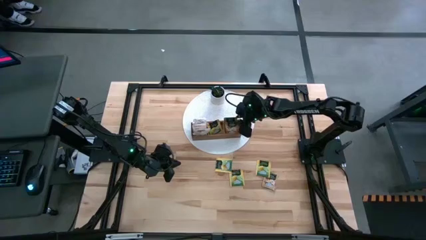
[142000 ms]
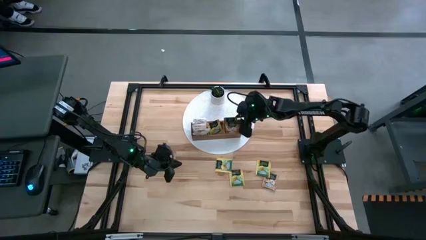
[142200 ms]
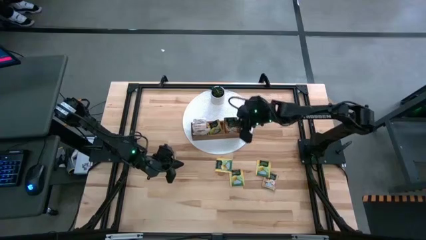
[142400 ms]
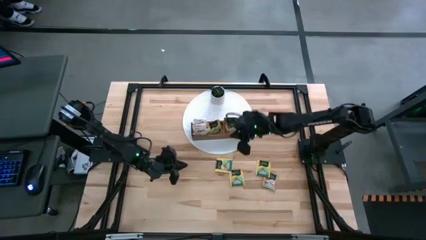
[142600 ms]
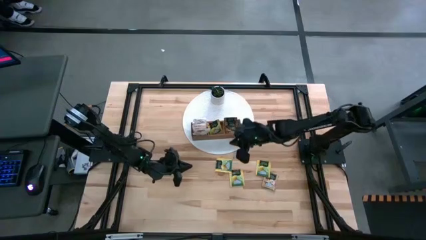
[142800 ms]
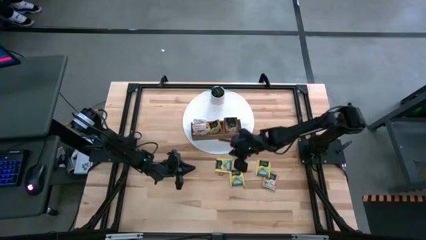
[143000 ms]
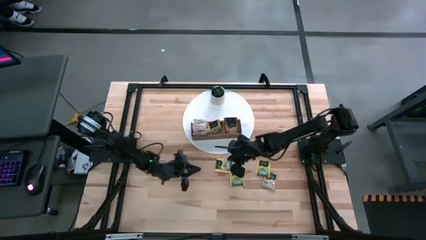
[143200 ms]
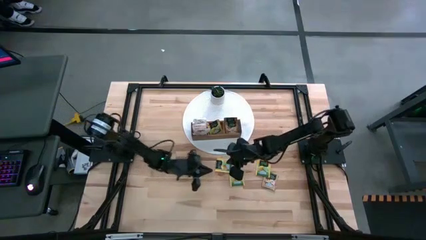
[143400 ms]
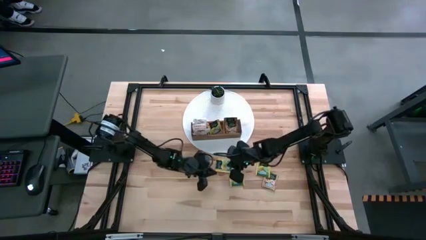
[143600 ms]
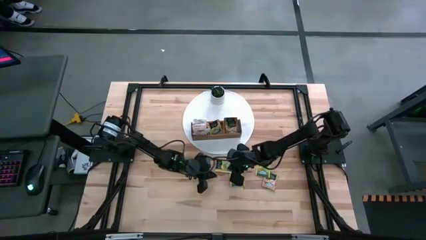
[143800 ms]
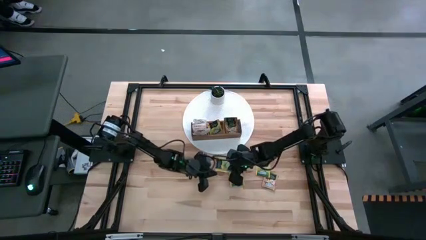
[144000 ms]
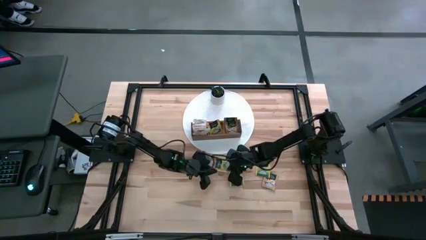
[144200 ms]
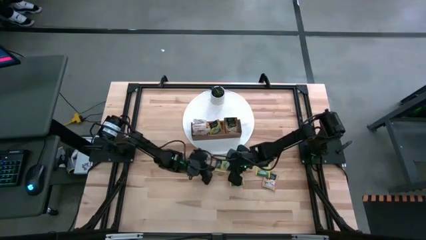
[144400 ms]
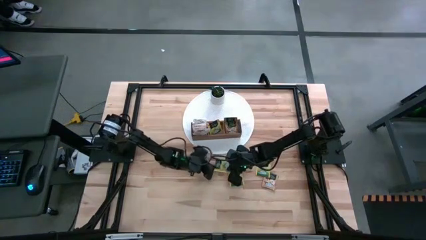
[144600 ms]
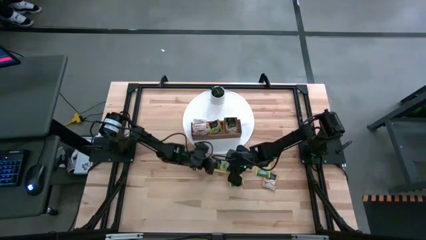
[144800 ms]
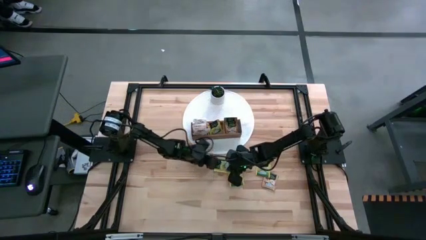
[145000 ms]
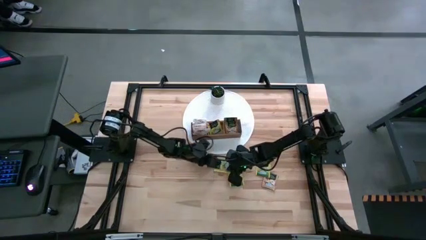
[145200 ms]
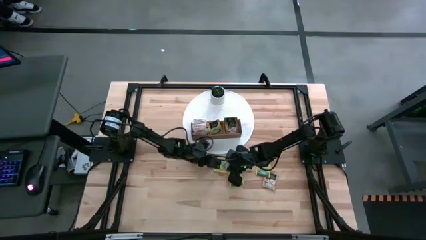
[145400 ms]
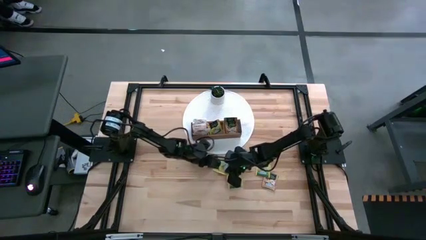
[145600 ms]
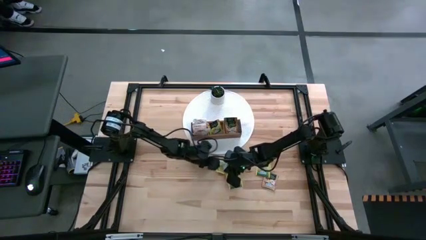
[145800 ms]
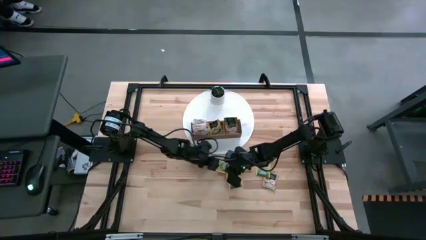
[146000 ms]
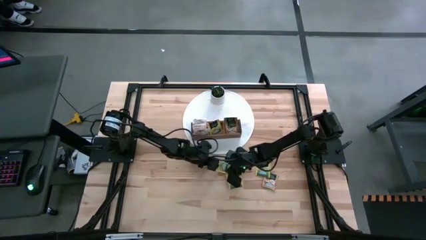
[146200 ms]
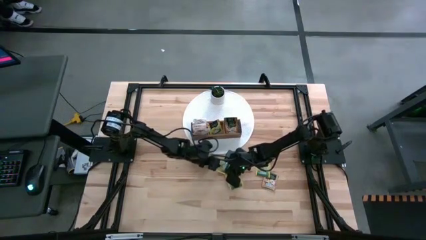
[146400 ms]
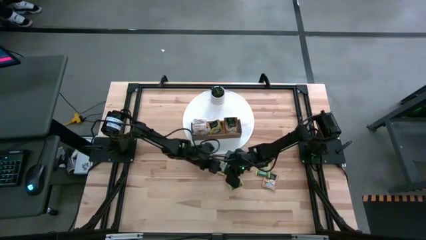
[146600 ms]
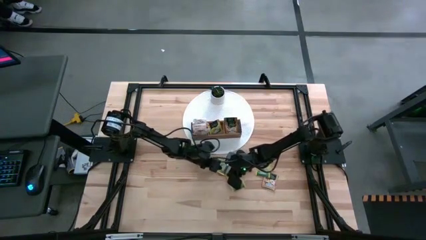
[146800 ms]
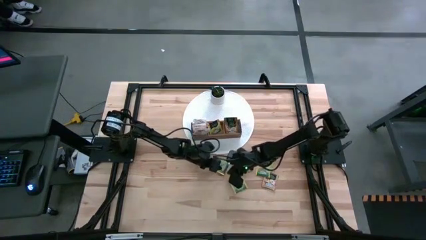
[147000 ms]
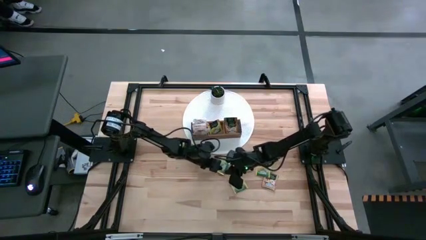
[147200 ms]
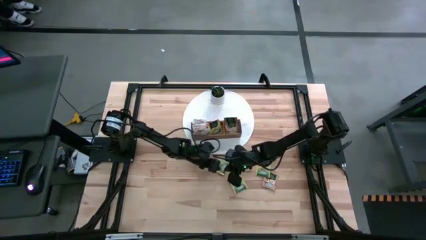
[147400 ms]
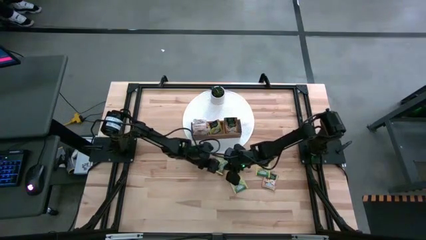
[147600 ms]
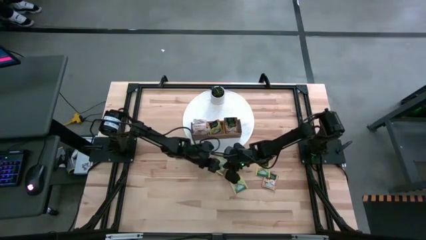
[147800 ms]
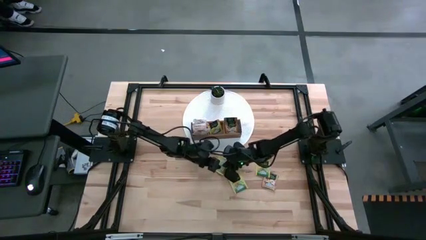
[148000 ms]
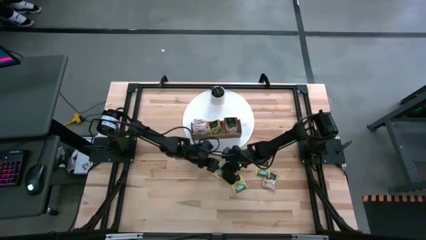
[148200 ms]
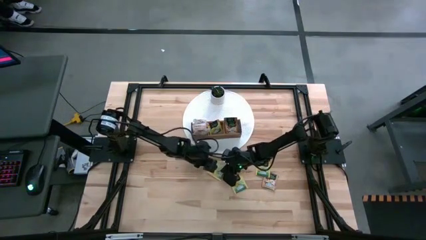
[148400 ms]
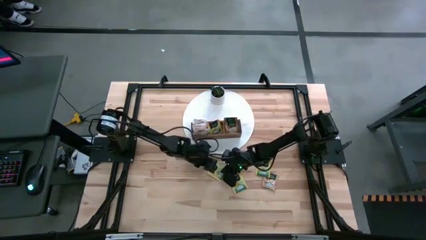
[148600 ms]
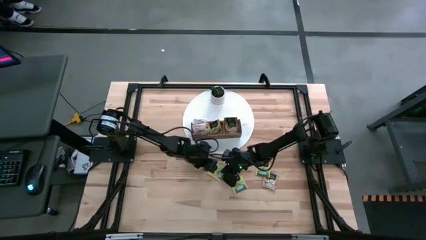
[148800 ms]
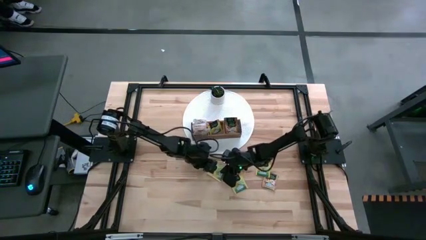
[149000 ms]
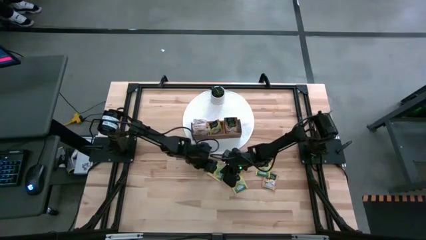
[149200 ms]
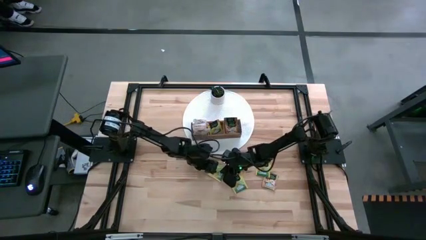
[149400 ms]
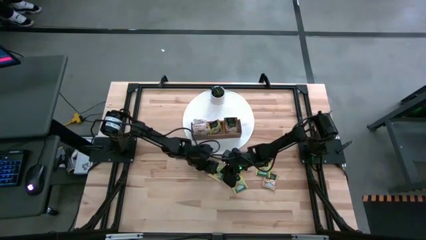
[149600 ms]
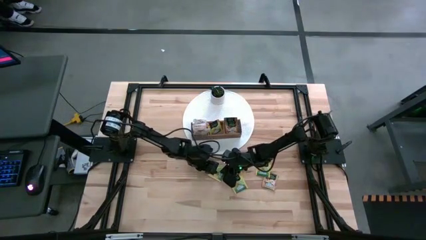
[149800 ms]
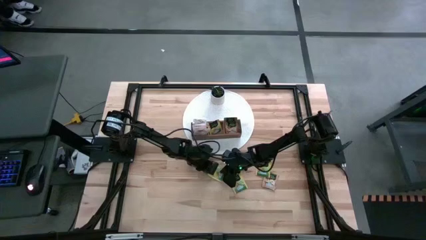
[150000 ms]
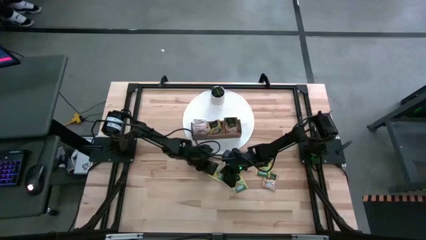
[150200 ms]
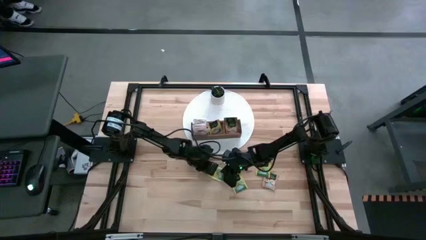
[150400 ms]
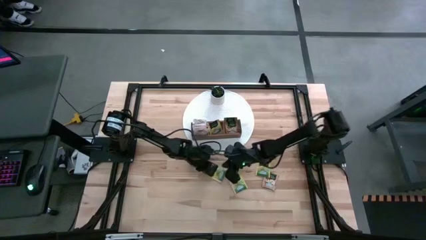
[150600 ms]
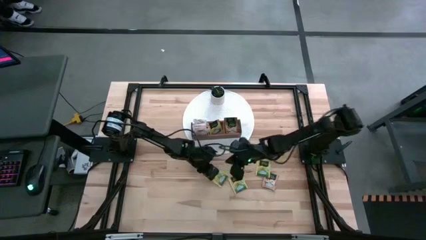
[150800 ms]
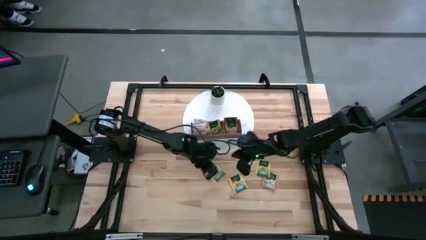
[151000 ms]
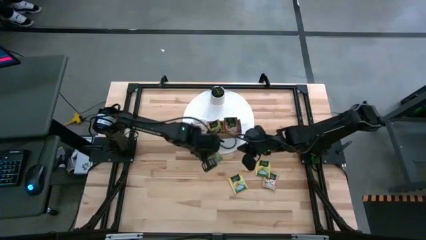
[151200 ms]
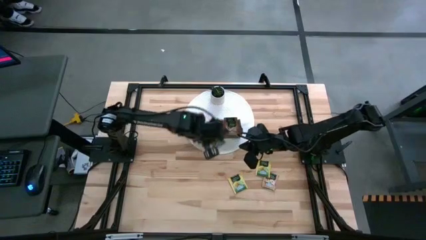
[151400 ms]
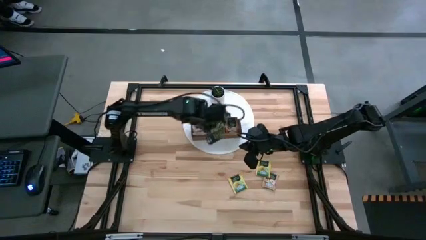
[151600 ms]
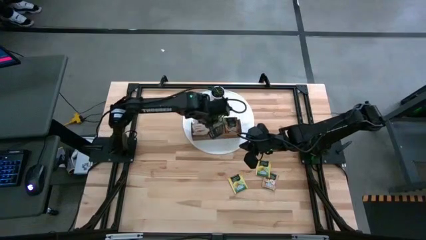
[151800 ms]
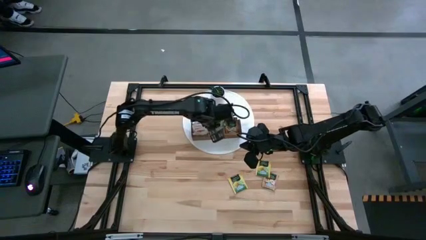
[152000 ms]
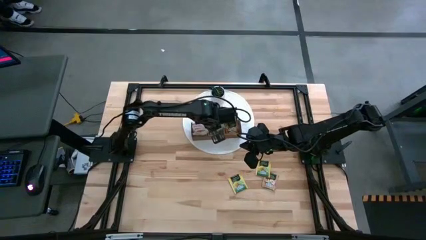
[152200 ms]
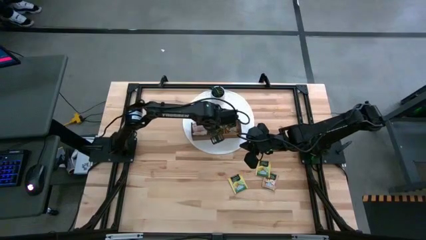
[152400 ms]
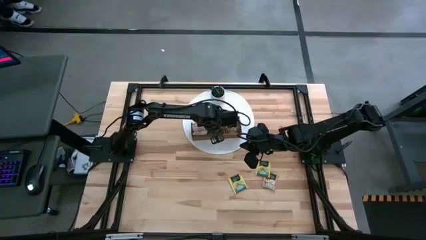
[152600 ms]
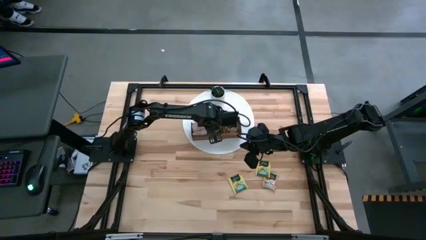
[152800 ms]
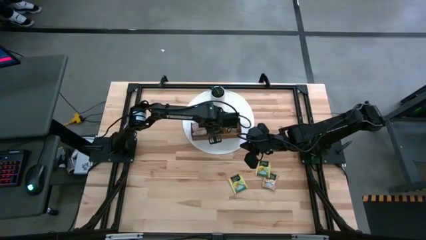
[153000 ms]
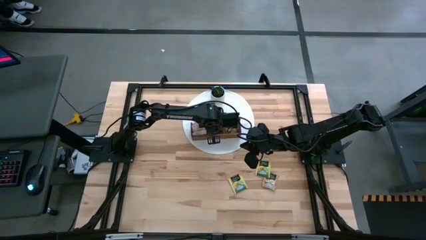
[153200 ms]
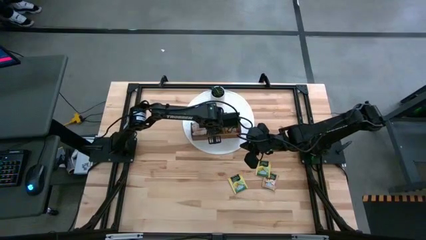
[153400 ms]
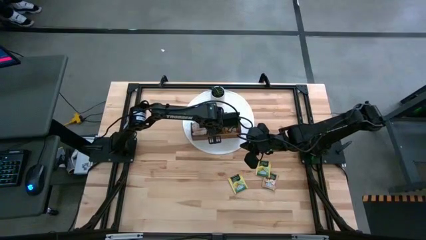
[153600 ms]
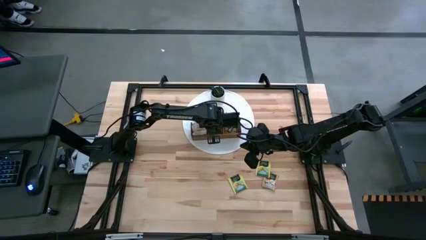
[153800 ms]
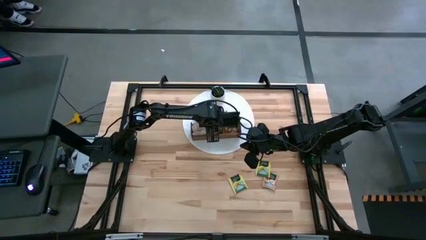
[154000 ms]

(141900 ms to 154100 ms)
Task: Pick & Place Tea
Put the yellow tea bag into the middle section of the wooden organizer

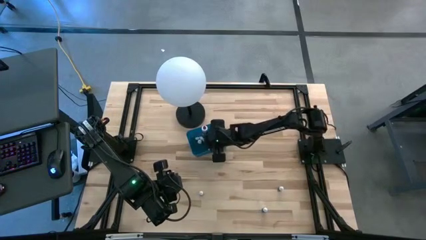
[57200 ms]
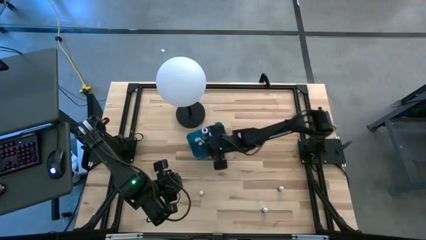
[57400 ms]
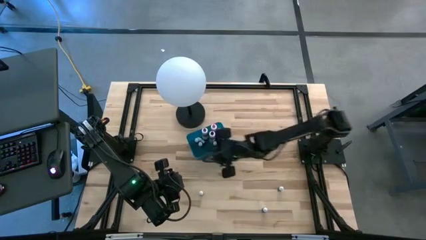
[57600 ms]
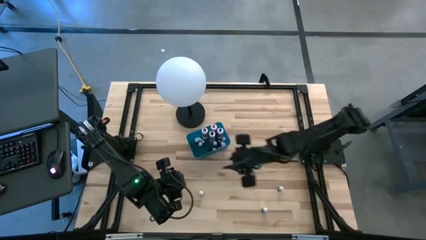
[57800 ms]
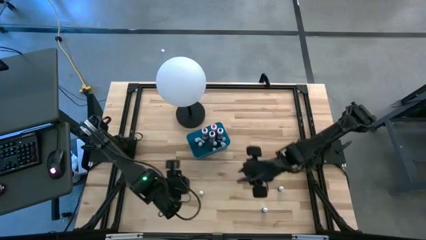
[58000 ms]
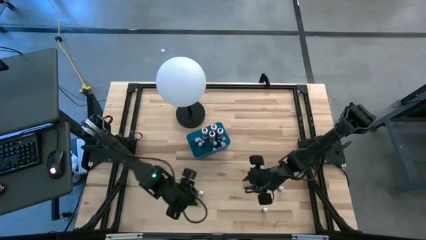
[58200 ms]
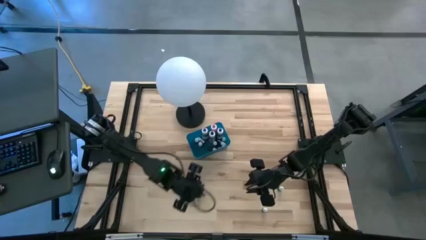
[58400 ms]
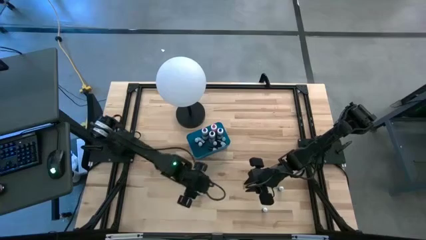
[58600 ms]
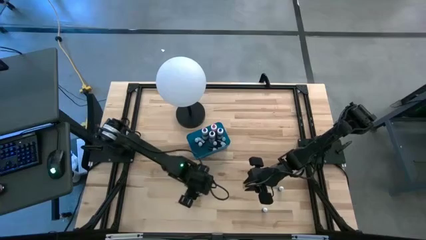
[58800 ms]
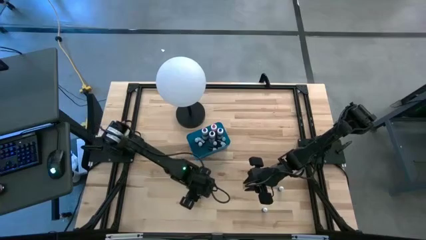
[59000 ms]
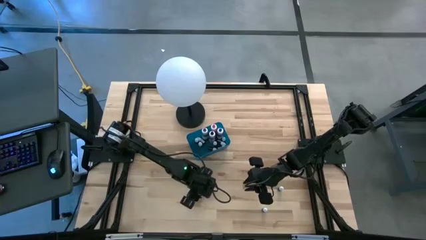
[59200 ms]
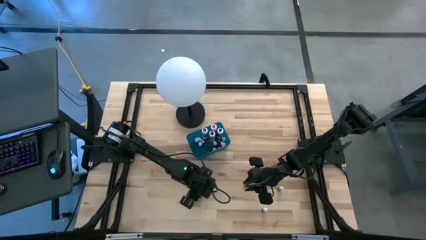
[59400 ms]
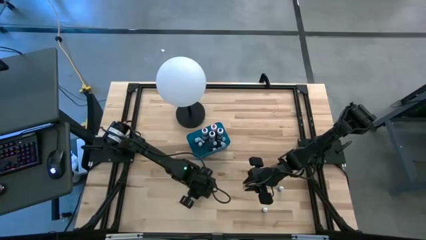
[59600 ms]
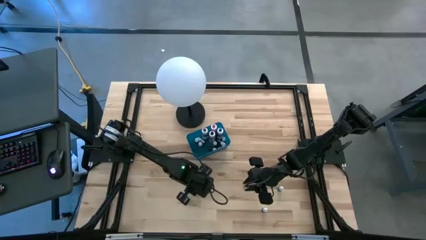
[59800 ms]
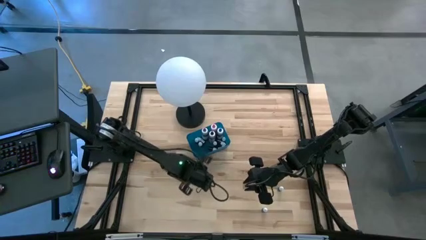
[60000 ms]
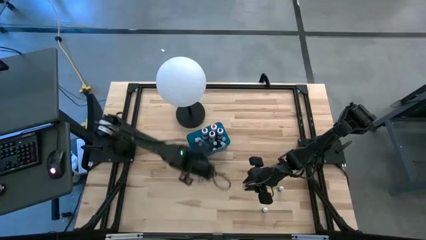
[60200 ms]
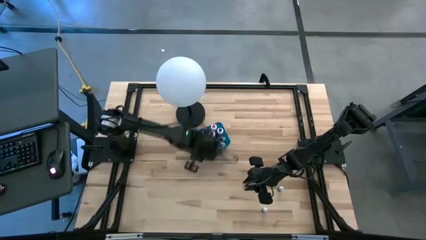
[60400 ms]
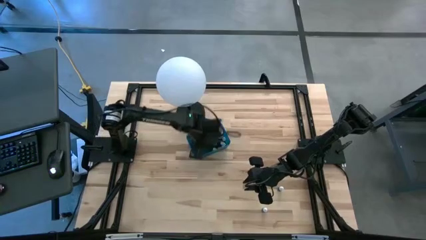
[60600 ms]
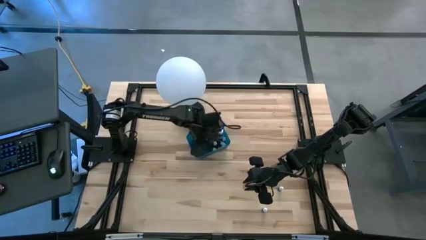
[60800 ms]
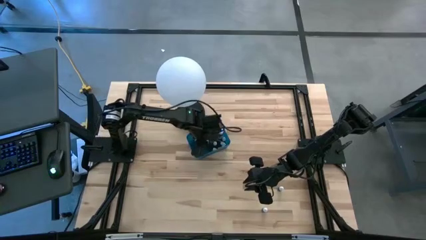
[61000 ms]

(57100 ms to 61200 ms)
Task: Pick & Place food coloring
Put the small green food coloring bottle into the blue container

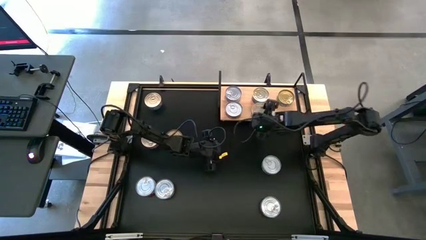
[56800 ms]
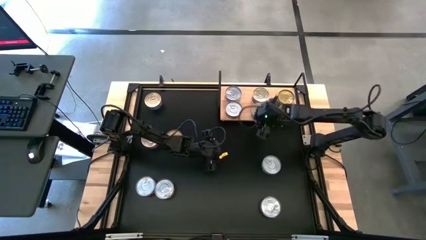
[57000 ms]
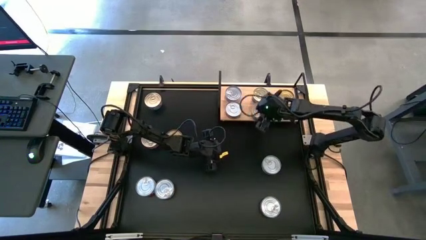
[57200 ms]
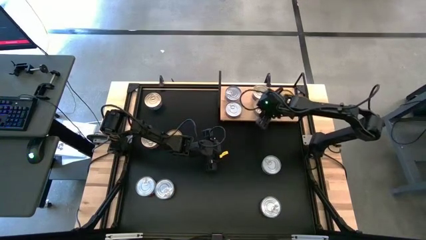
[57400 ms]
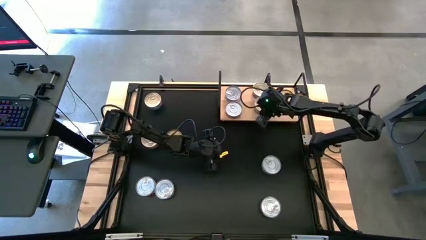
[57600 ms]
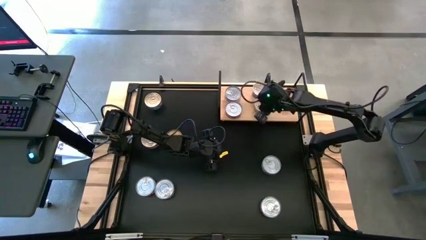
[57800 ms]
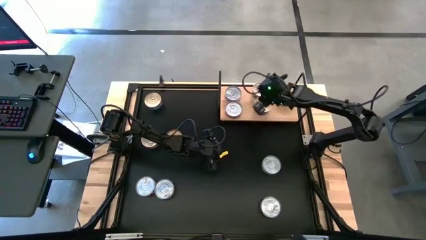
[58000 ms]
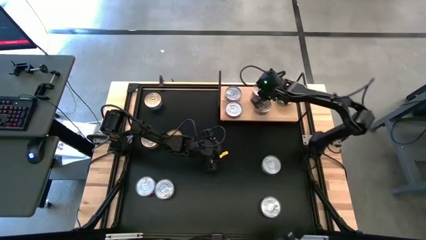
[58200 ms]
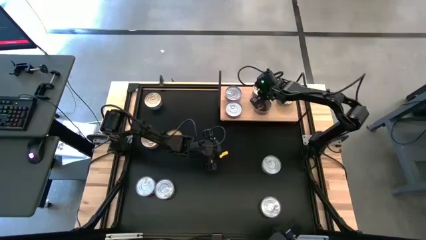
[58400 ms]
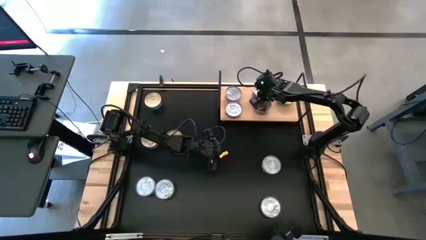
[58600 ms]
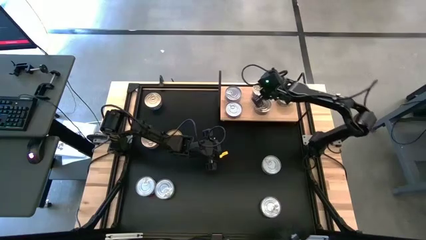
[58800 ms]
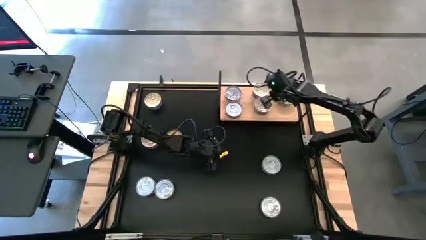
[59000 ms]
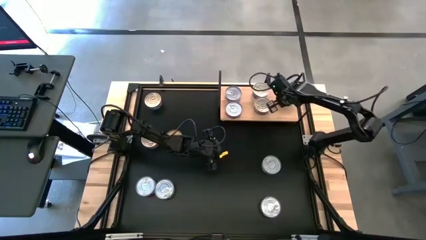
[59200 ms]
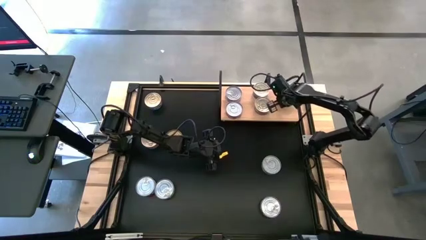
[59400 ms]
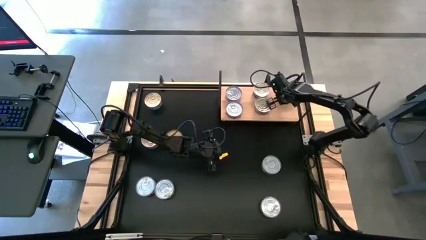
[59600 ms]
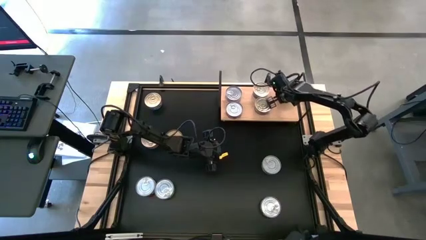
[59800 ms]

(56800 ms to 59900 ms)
Task: Stack canned seafood by type on shelf
Adjust the tuna cans on the shelf
